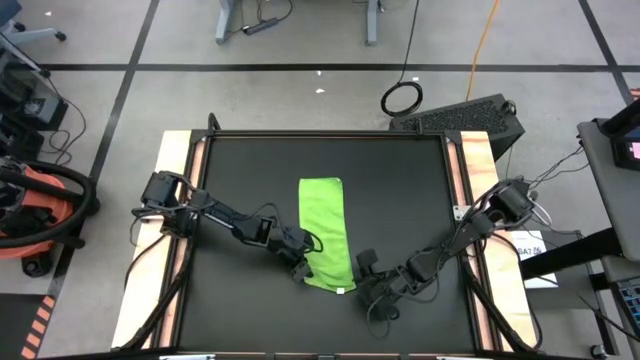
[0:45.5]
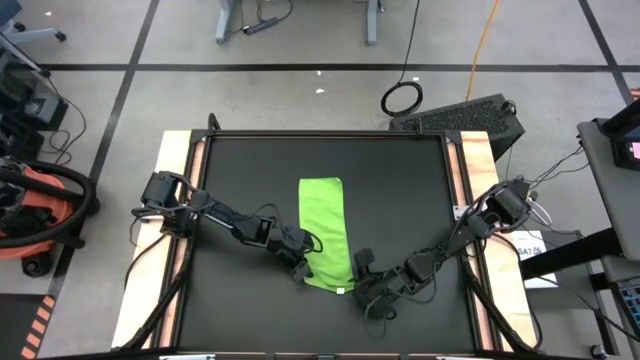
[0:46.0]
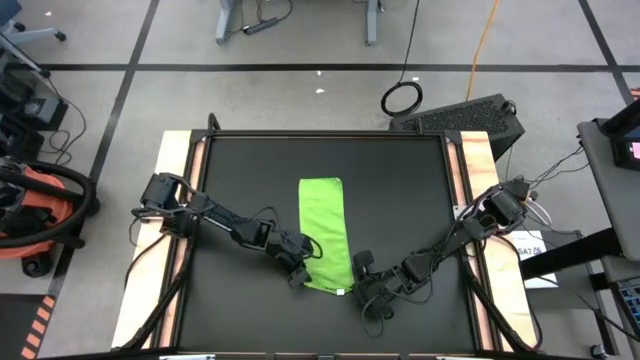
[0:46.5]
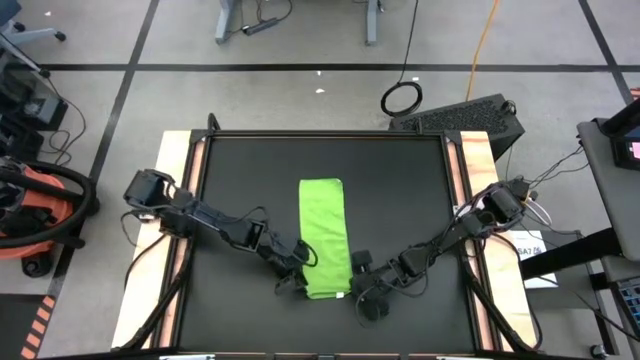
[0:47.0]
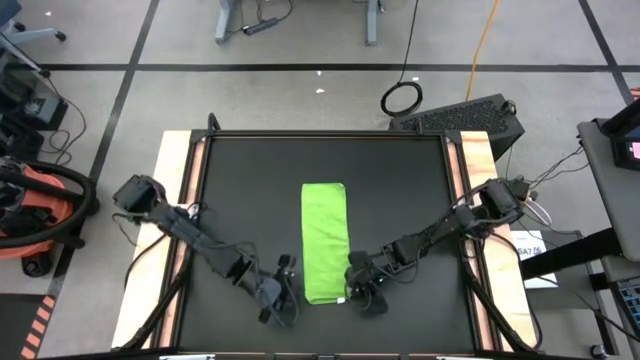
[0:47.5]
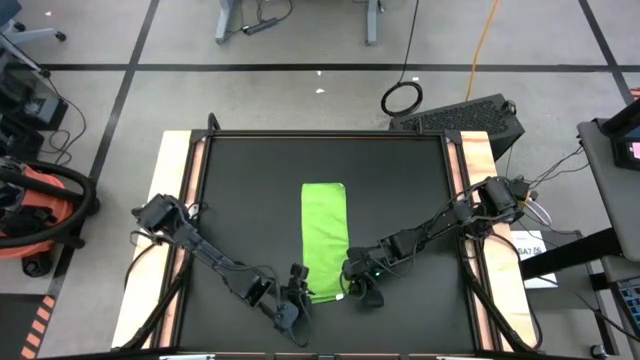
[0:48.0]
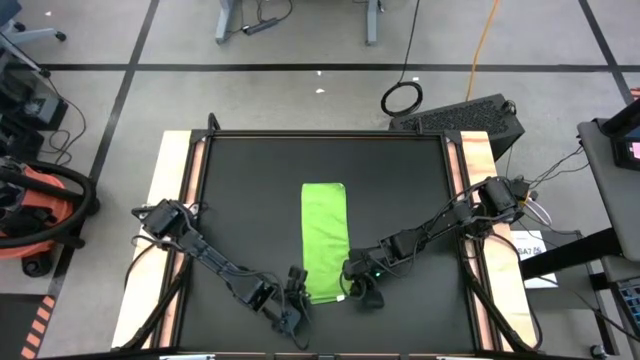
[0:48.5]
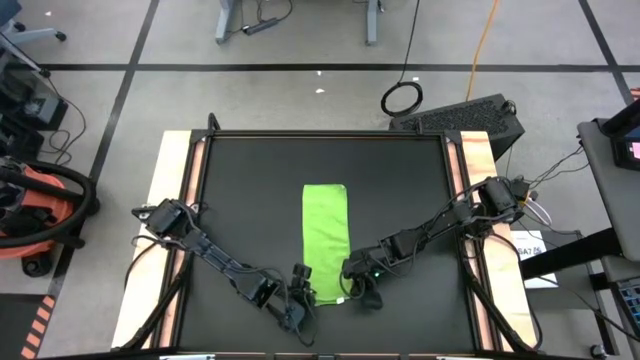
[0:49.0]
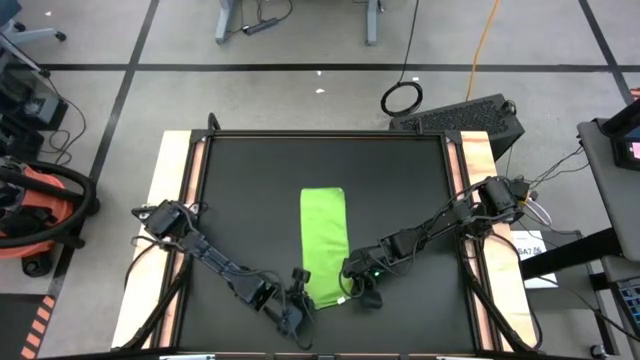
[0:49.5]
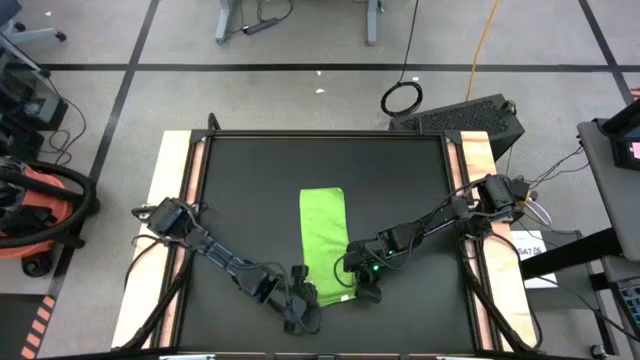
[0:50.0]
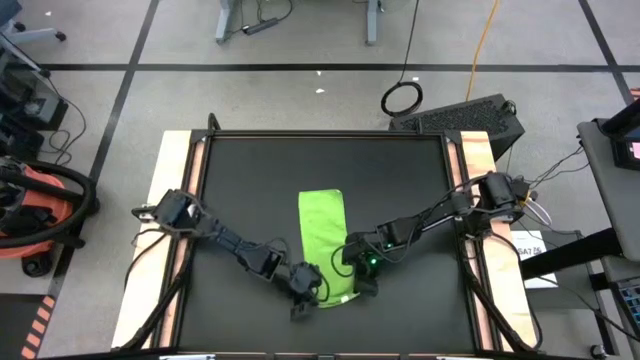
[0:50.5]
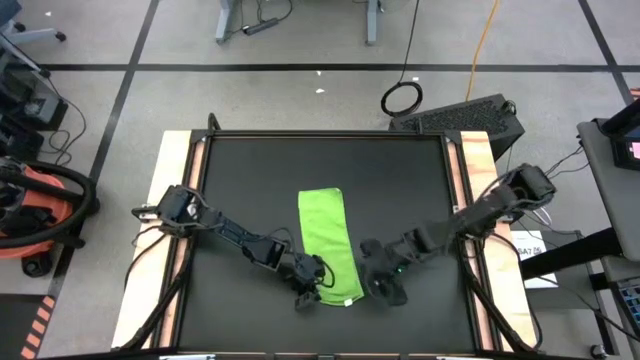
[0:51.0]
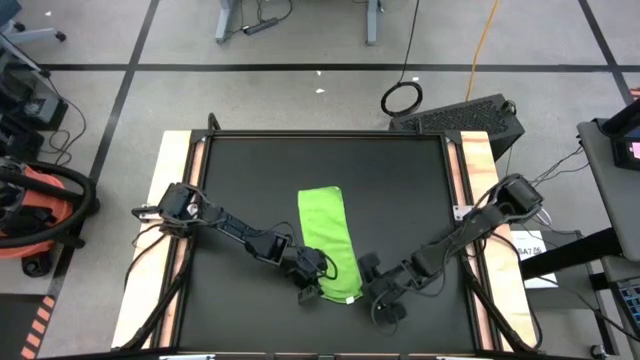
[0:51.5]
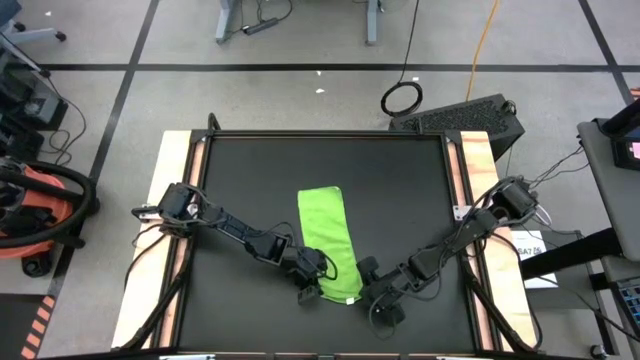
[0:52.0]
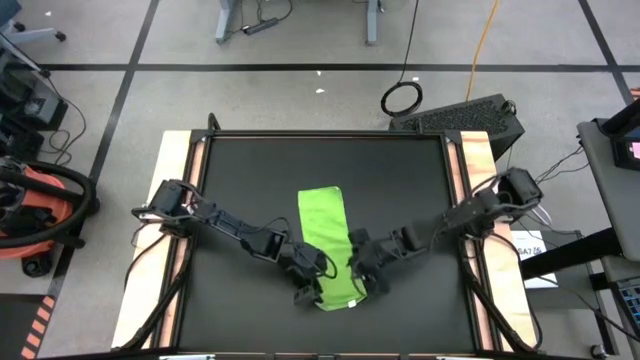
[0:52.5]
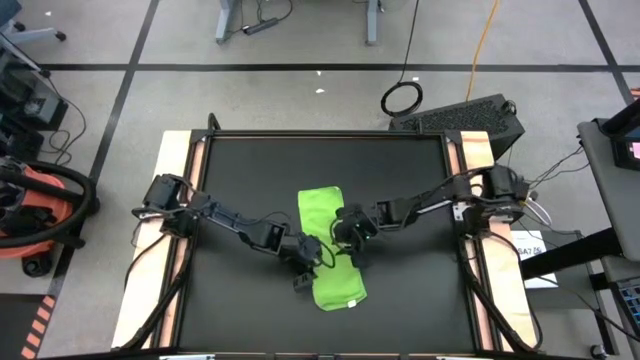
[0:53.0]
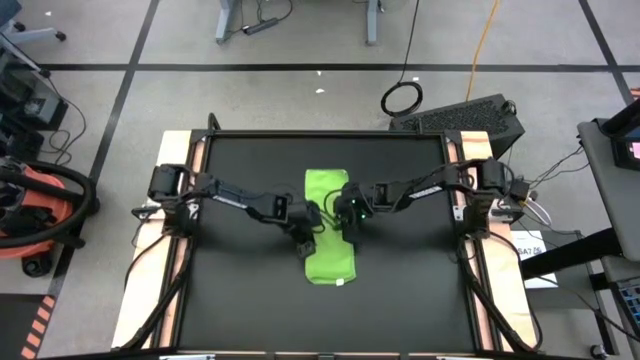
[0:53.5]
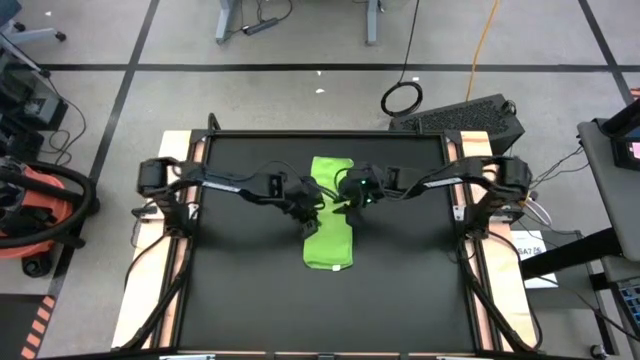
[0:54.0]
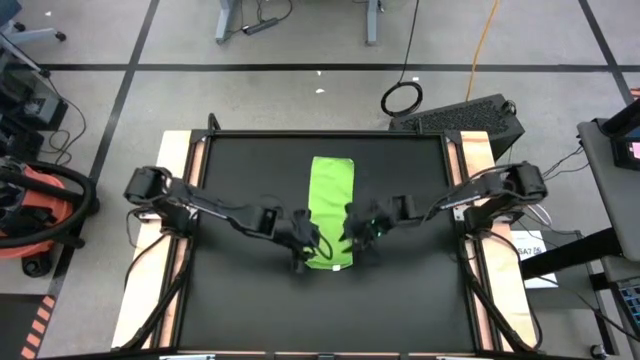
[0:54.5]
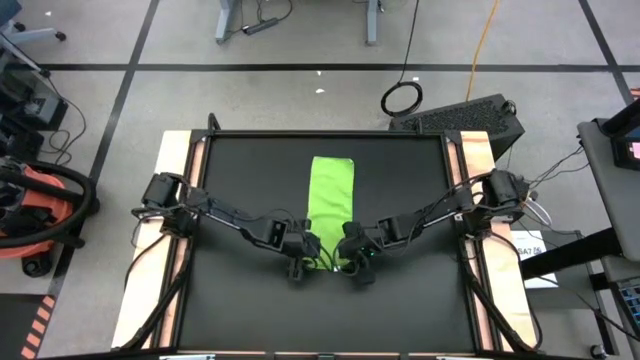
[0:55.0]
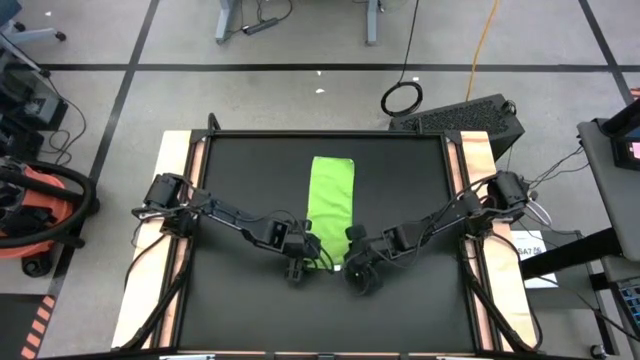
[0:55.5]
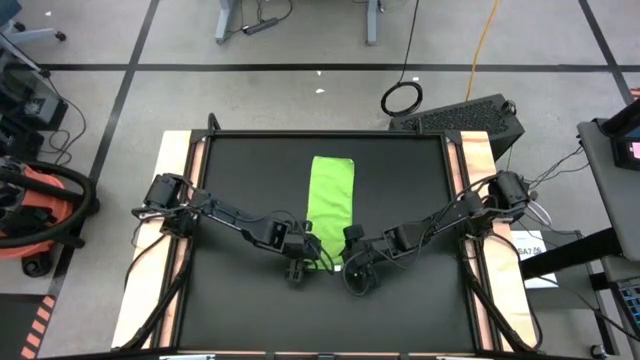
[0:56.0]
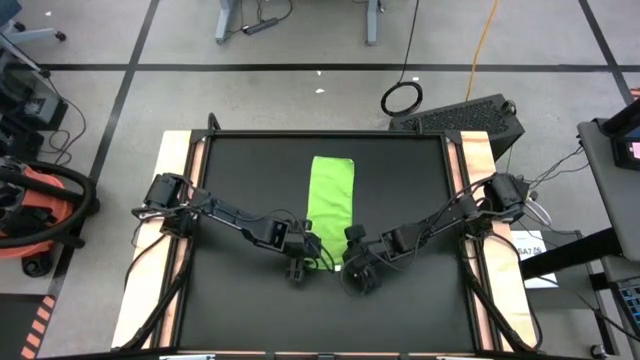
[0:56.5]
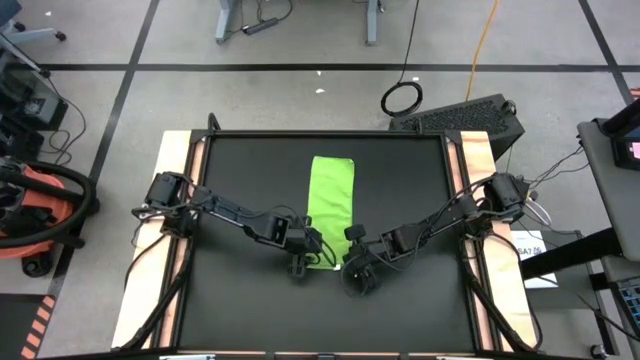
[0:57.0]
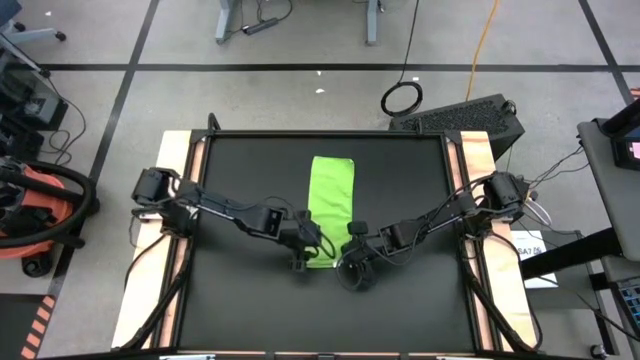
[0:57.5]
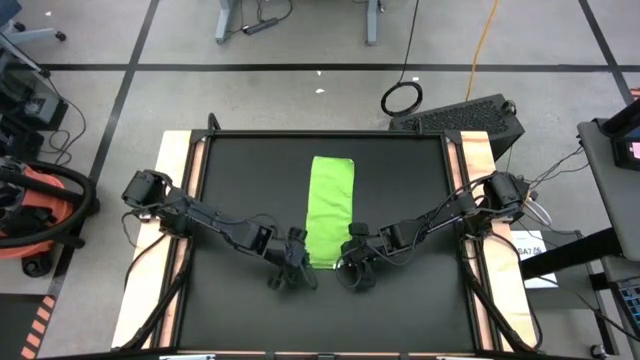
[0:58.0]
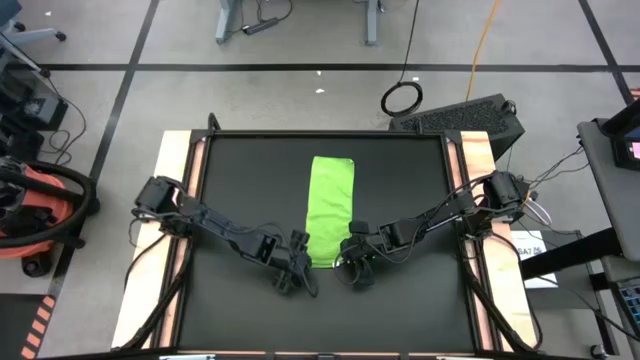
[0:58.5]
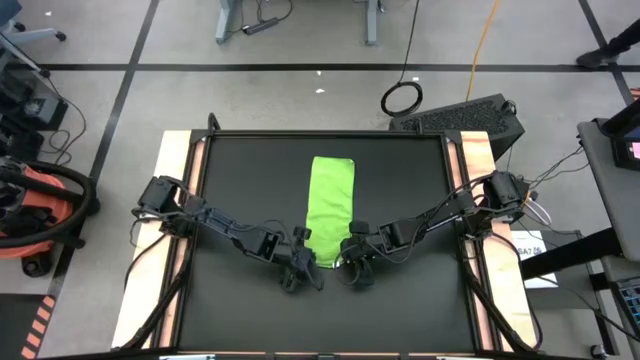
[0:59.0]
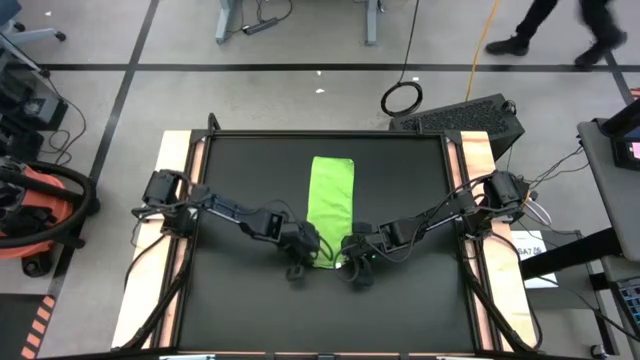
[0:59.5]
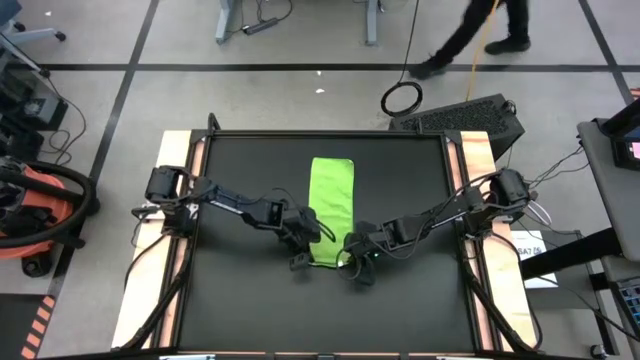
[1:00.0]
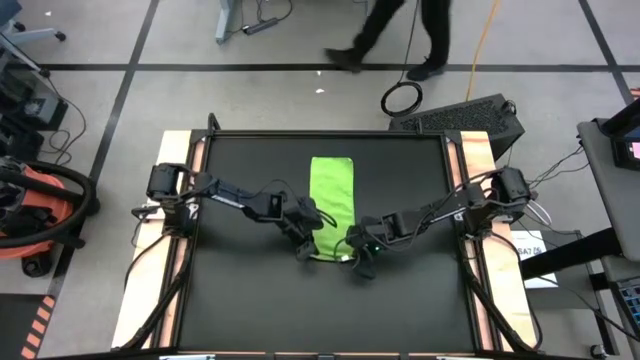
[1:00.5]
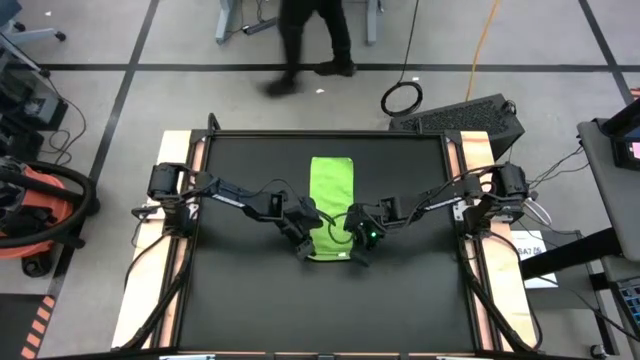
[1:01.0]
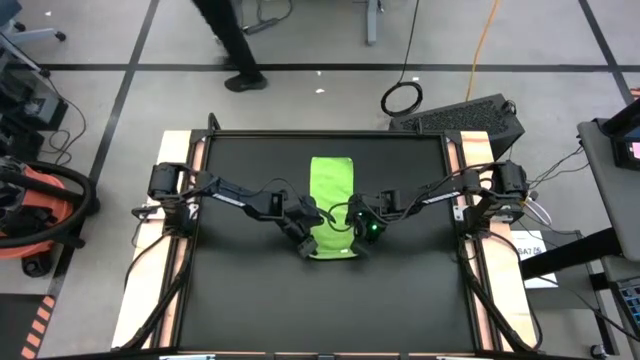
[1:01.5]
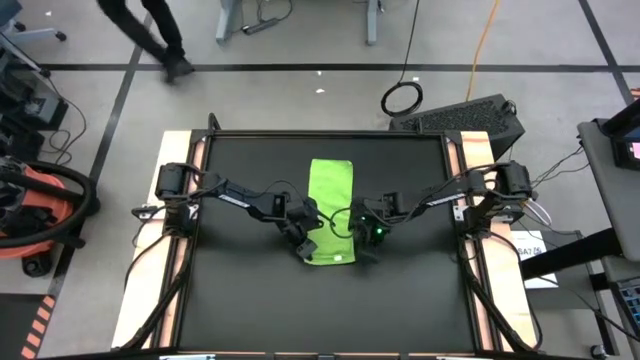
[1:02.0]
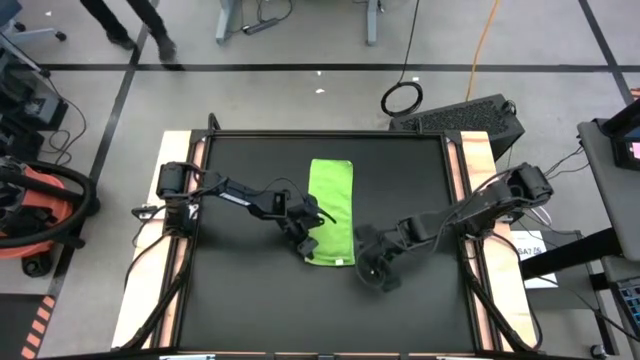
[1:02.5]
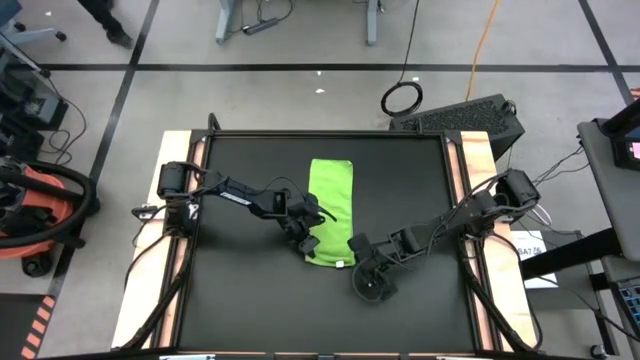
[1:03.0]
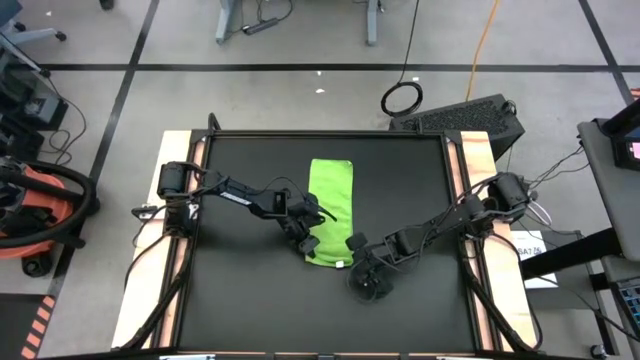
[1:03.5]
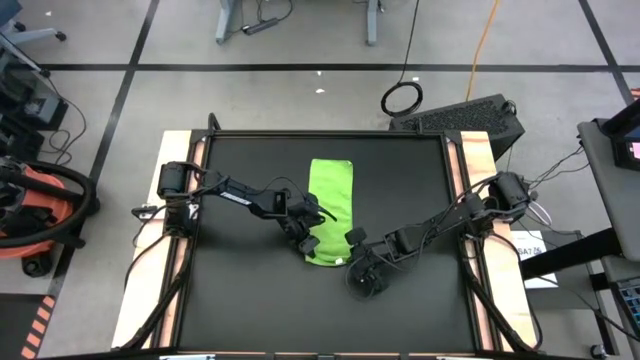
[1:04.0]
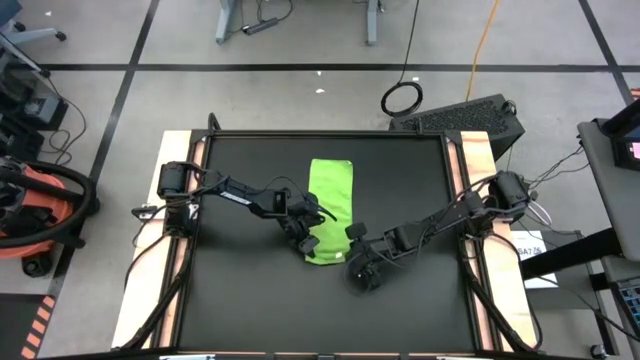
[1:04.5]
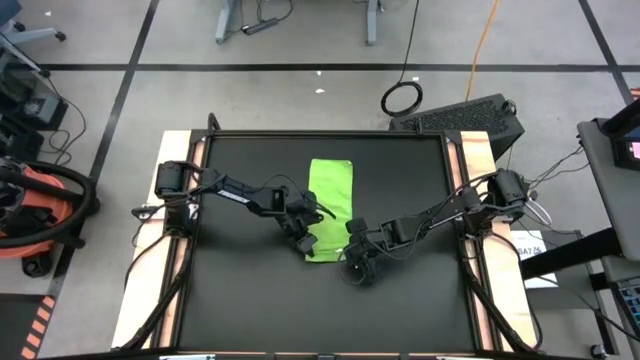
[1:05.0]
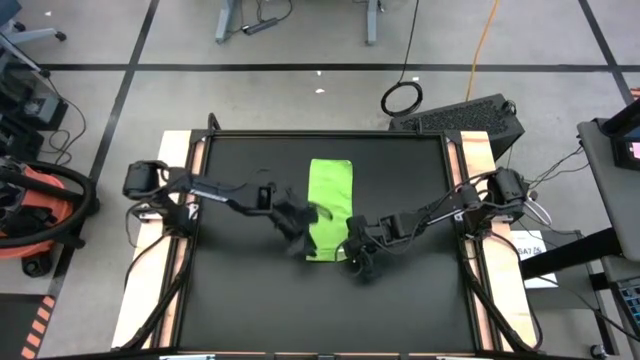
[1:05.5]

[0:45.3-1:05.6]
Task: Roll towel
Roll the green towel
